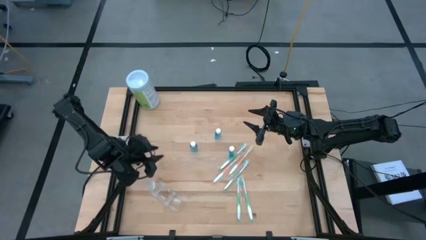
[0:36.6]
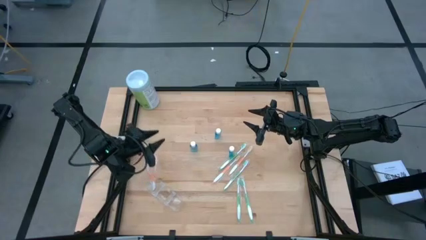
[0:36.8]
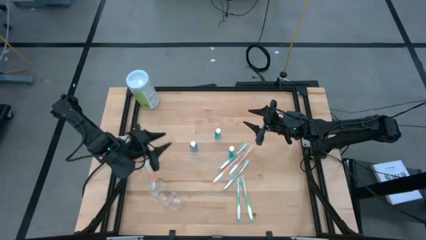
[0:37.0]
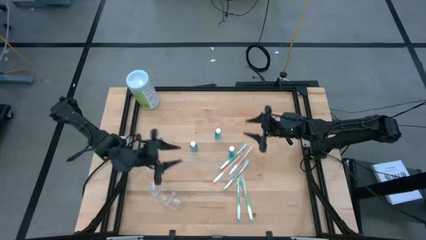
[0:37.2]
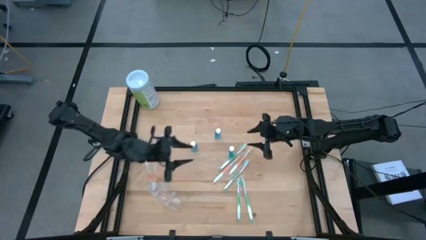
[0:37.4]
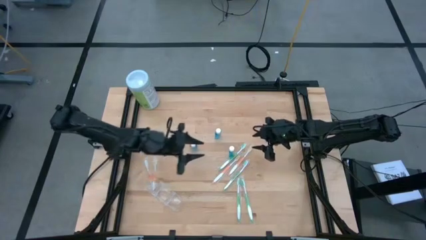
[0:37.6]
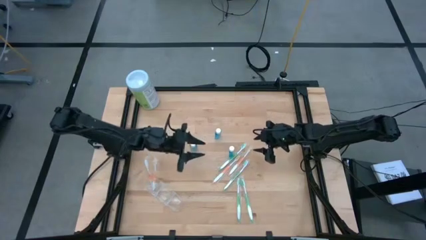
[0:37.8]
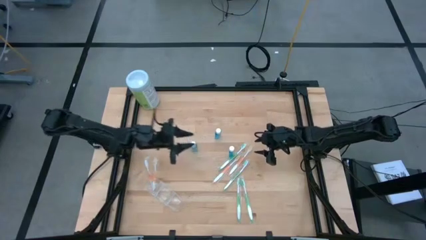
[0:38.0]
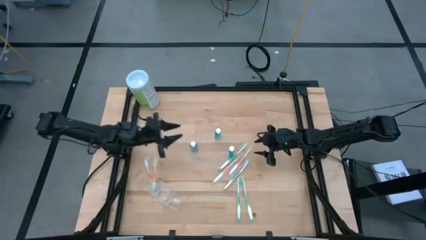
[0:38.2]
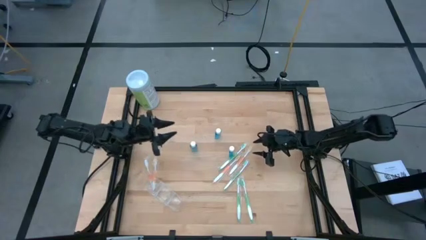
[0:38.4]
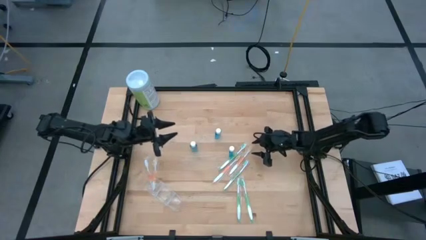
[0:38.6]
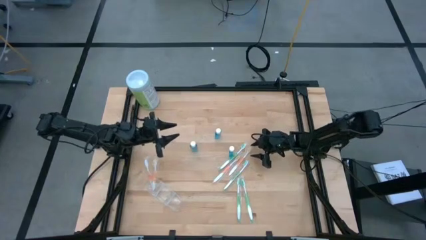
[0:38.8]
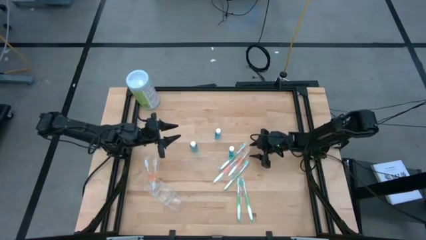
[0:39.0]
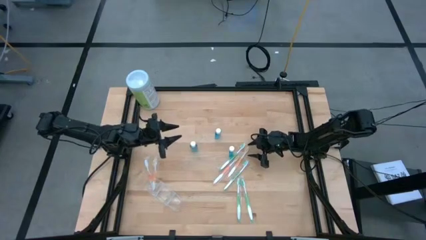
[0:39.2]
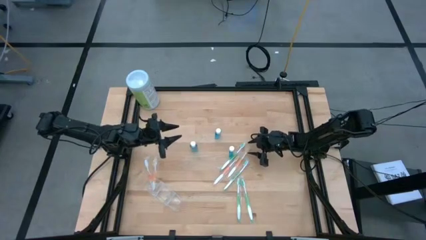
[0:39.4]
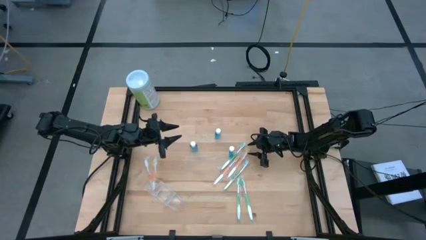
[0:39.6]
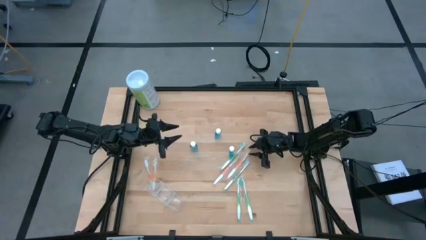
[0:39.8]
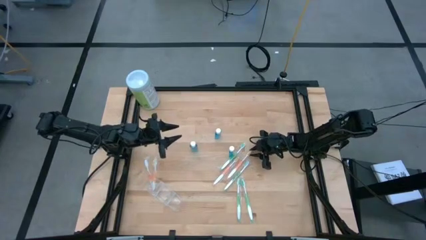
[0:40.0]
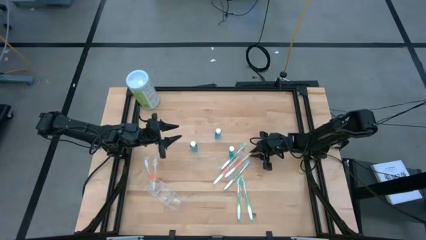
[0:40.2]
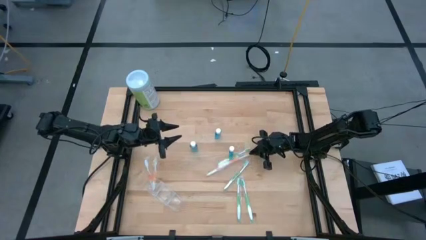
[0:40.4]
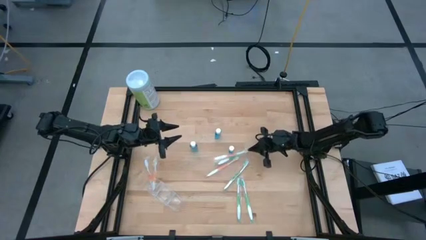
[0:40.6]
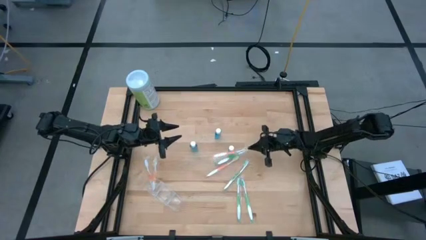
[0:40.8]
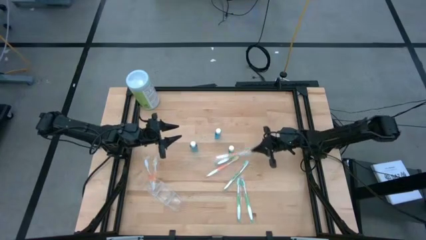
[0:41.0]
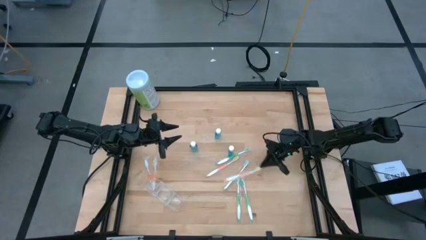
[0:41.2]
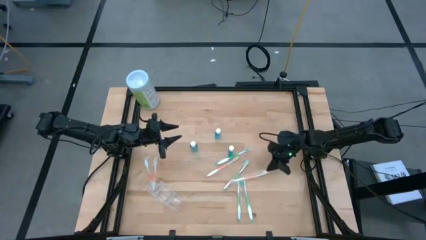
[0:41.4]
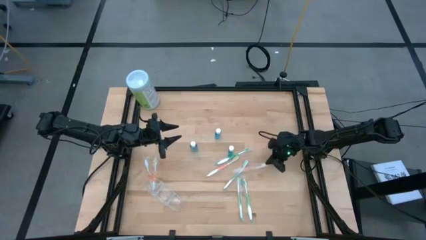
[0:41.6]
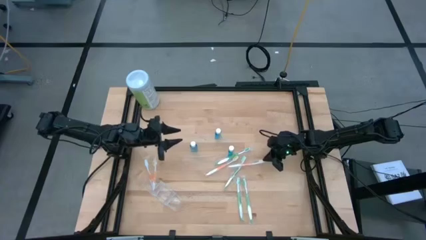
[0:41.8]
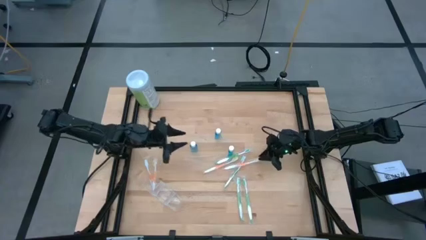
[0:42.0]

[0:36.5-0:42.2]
Task: Pick & Place toothbrushing station
Put the orange toothbrush into the transparent organizer

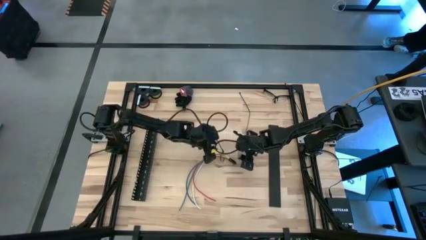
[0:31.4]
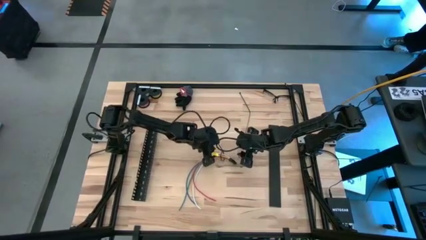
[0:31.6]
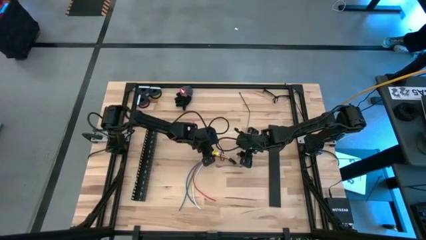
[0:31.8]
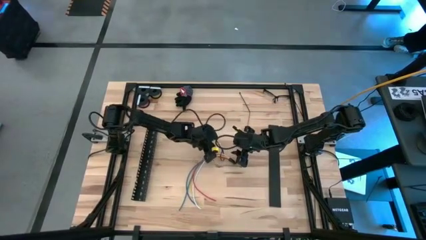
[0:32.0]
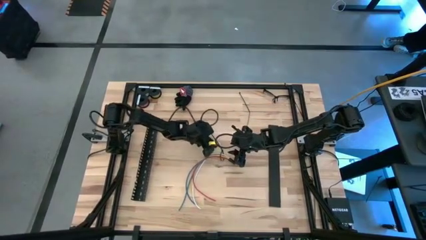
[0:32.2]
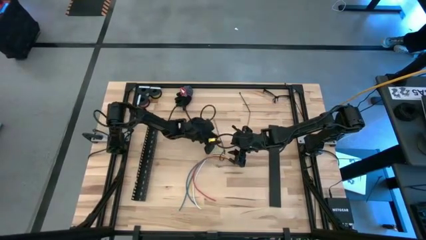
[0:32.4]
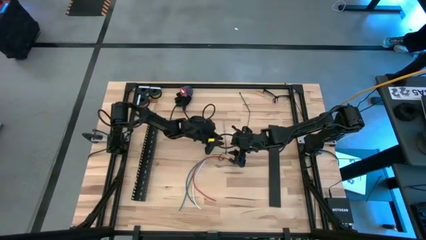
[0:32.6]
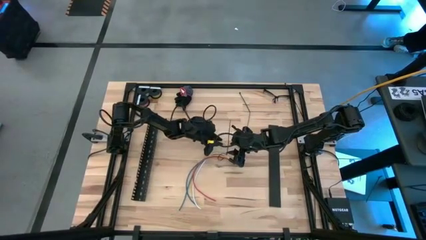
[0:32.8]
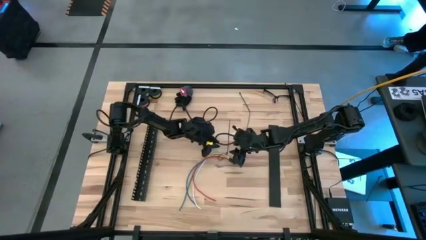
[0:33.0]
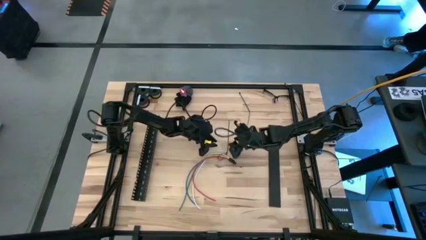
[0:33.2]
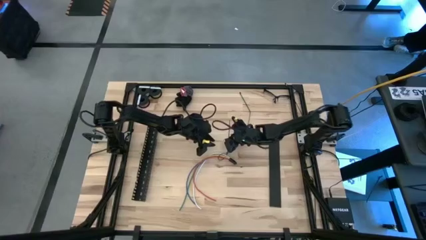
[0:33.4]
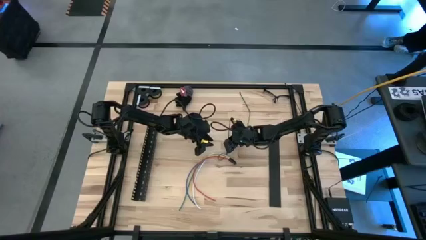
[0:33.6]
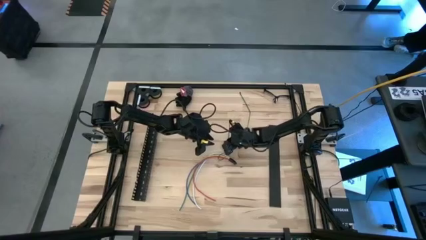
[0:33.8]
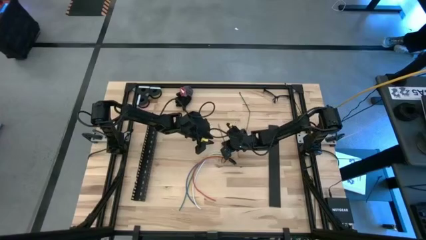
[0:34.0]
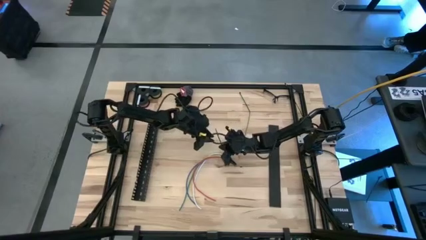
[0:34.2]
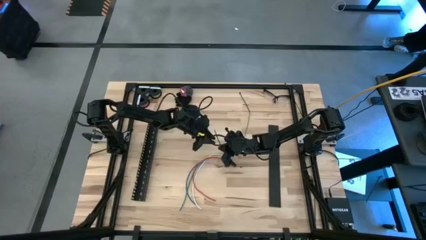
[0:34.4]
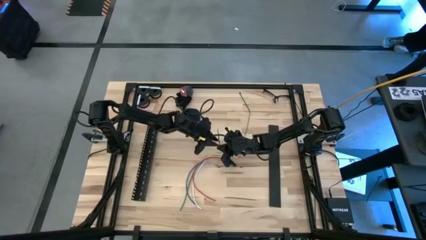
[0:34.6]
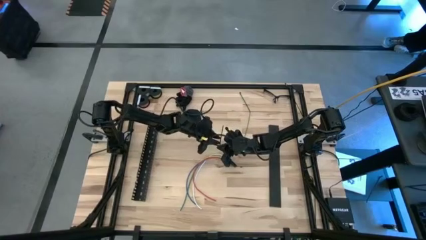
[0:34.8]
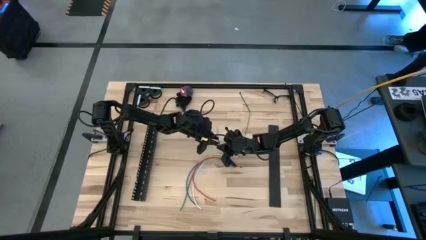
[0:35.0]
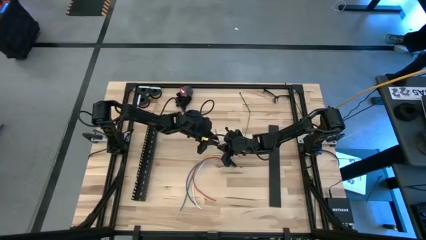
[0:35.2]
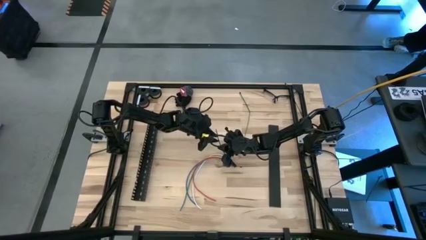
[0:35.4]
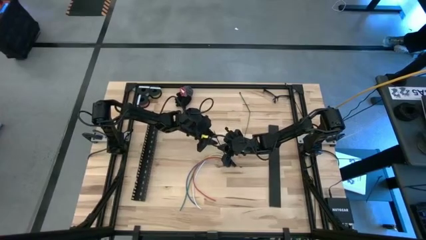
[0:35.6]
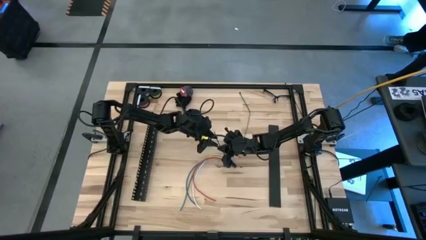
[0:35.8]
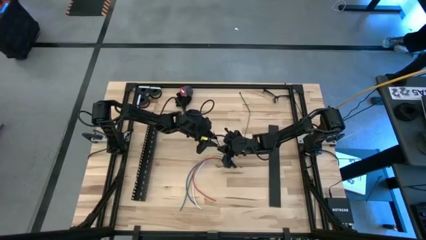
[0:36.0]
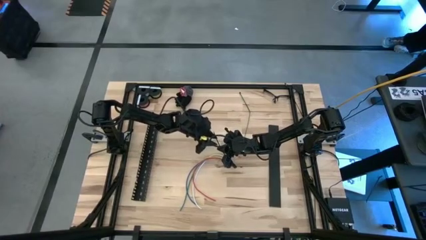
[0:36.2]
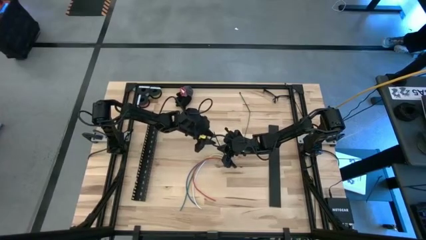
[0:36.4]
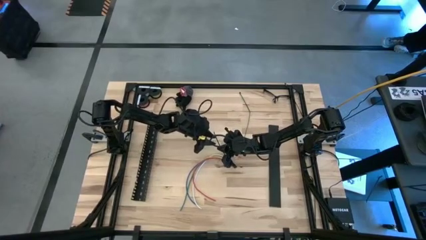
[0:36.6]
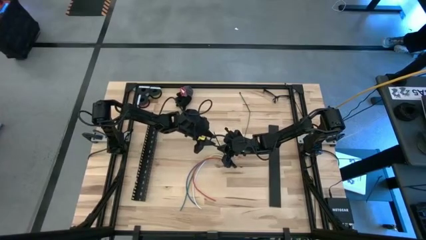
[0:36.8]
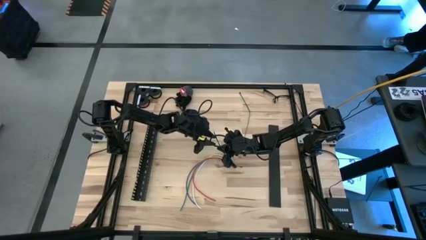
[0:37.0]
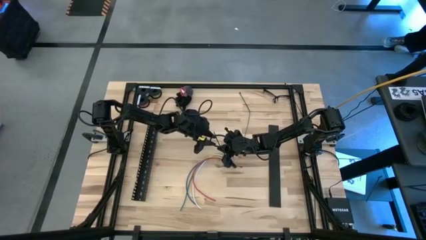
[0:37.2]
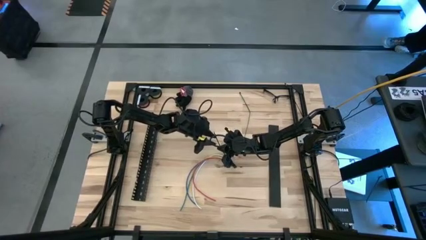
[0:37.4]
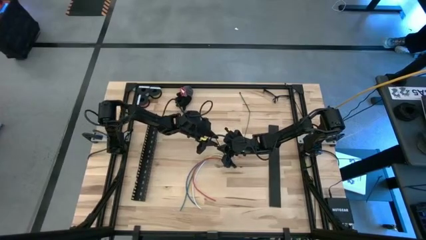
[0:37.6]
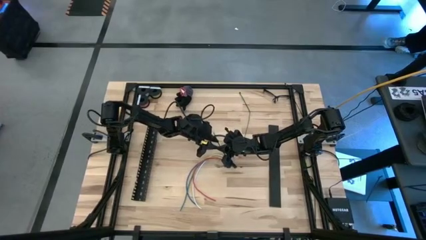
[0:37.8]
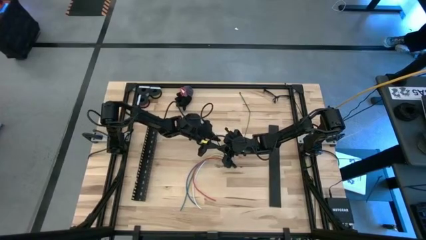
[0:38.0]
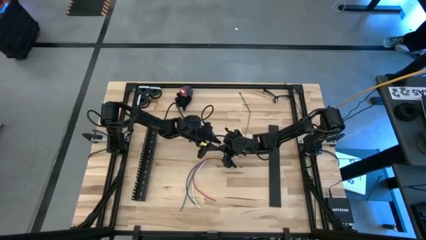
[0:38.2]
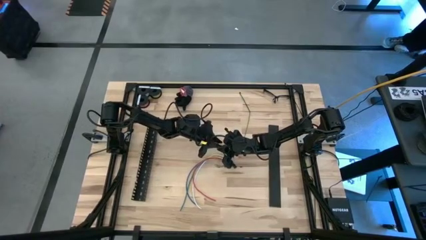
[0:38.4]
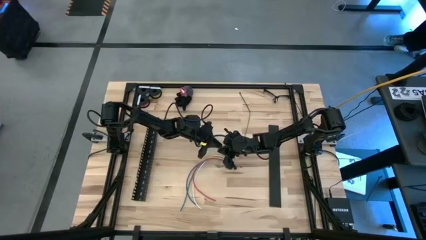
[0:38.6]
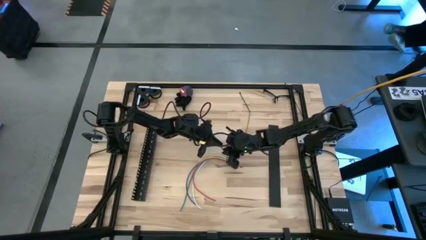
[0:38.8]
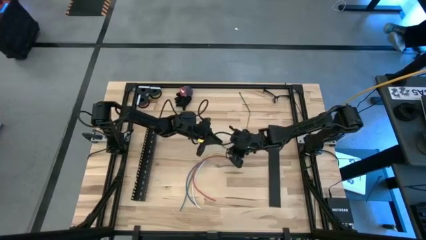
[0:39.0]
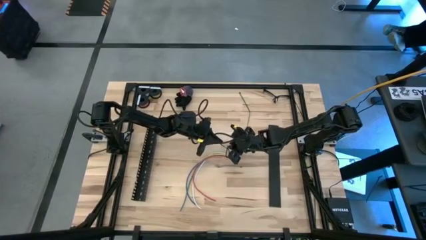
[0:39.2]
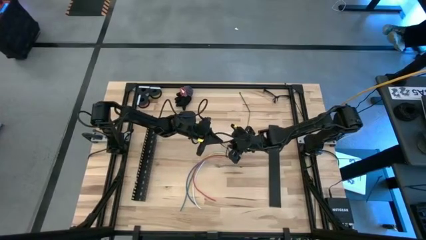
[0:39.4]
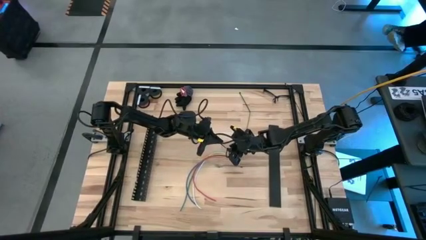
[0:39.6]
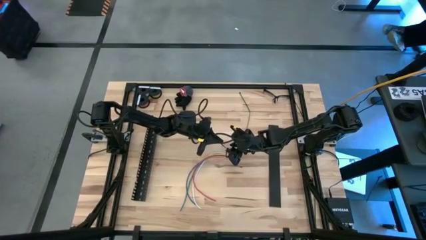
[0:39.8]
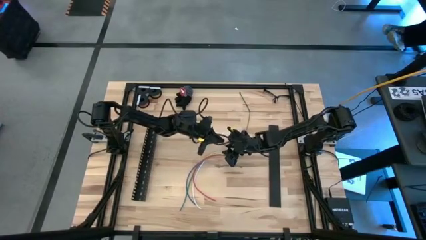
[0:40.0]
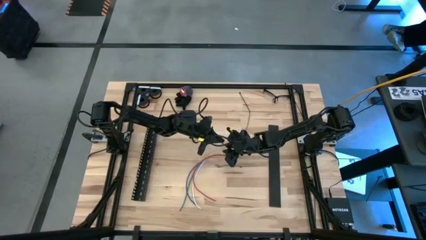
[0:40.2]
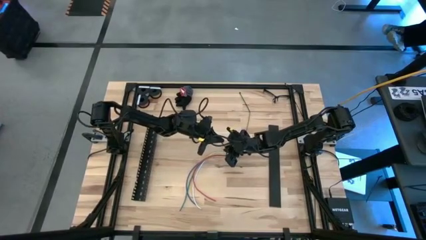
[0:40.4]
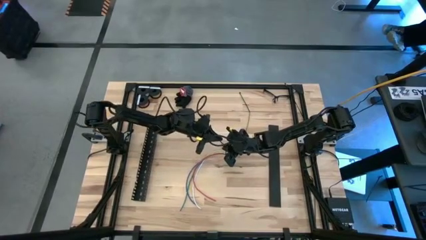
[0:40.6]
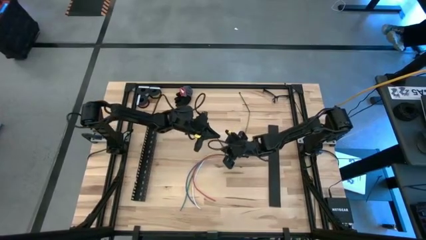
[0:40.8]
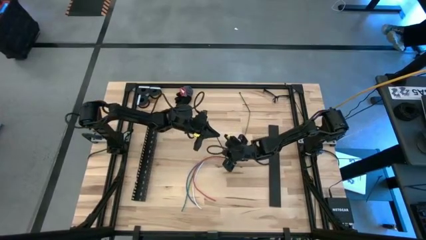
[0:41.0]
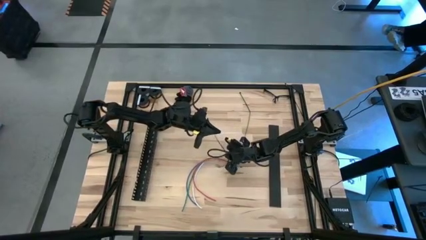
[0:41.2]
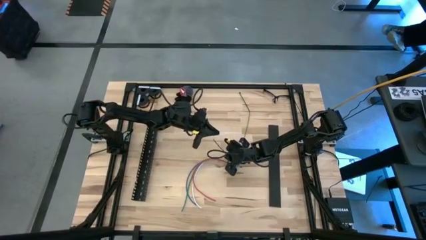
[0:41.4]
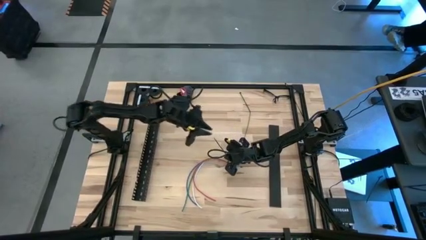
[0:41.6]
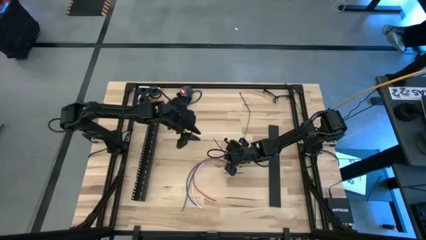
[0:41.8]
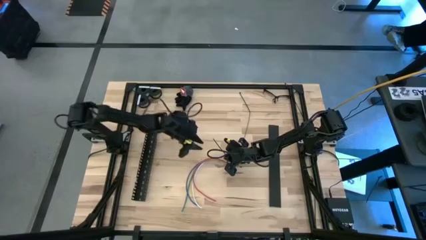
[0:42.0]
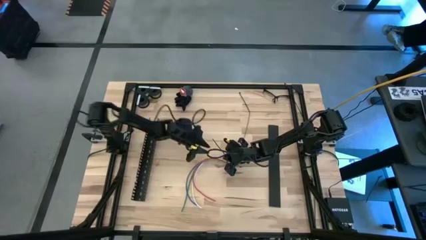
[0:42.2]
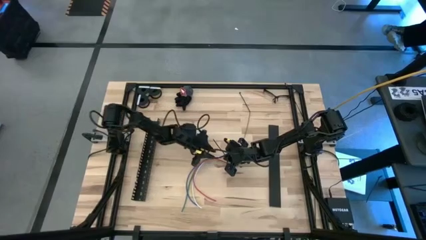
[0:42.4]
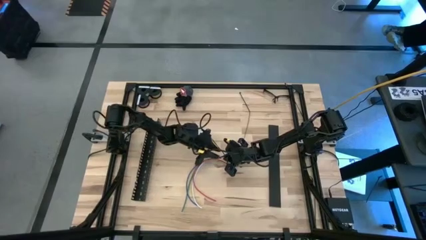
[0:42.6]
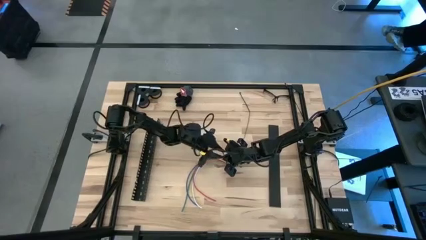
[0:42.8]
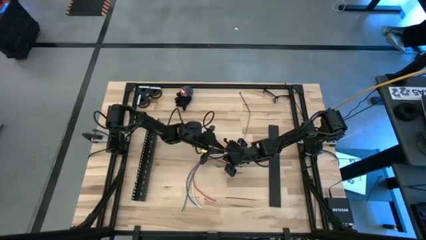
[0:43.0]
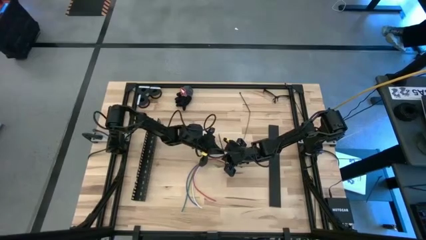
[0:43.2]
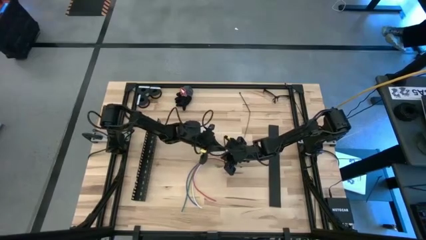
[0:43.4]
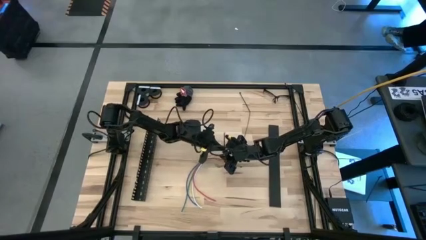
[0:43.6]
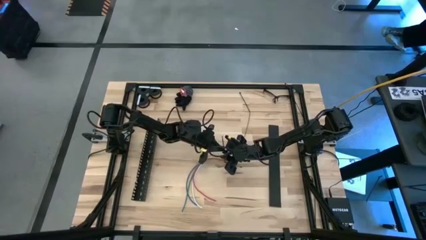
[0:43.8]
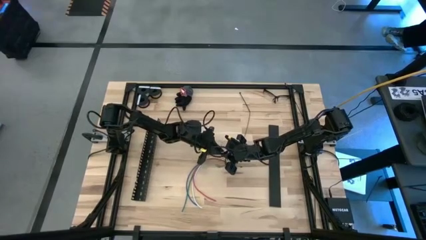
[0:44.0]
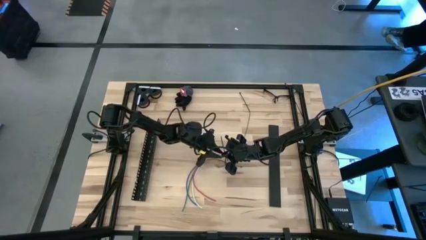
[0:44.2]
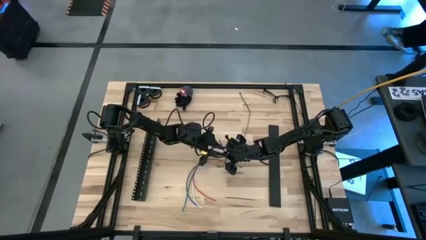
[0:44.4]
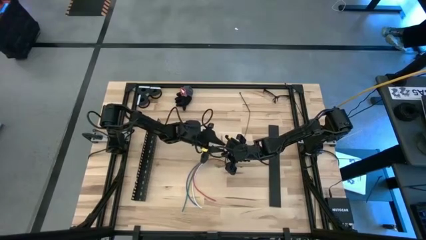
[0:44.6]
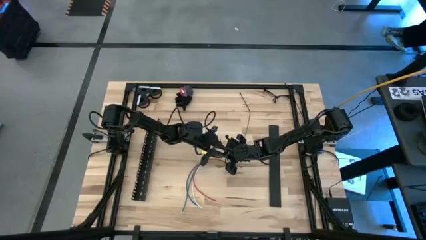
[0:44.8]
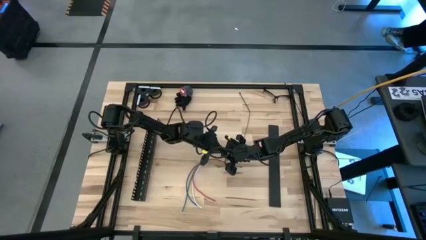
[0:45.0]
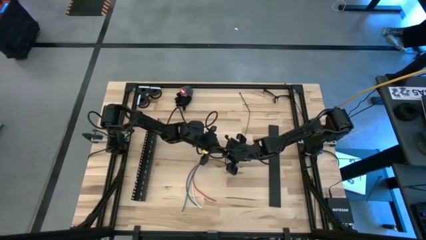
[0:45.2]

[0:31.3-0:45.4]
Task: Ziptie cables
Wrap the cable wires with the black zip tie
